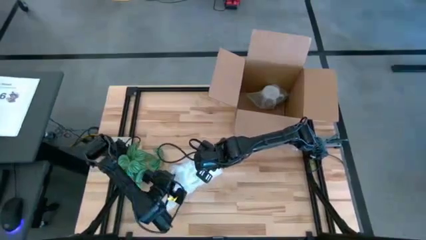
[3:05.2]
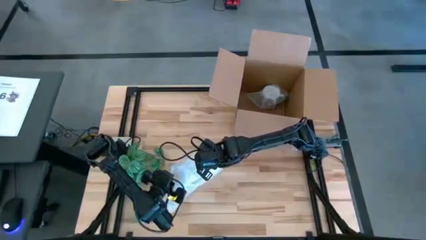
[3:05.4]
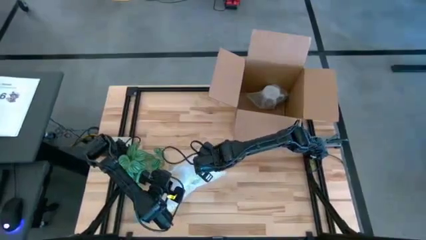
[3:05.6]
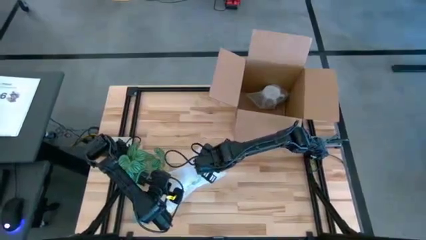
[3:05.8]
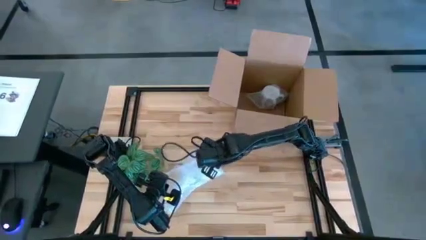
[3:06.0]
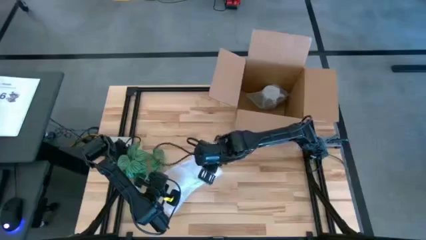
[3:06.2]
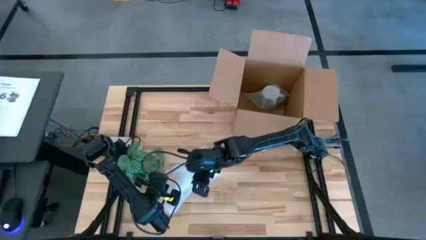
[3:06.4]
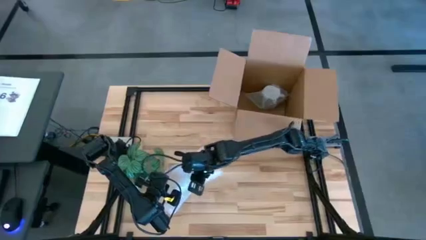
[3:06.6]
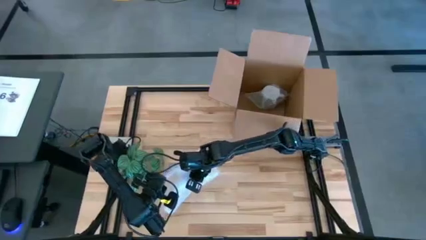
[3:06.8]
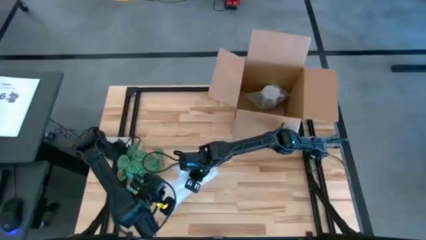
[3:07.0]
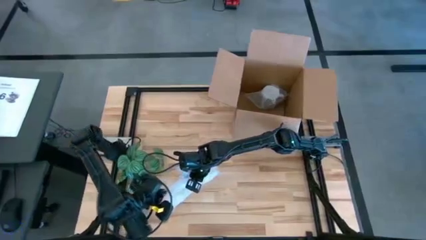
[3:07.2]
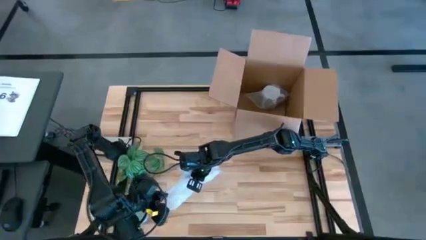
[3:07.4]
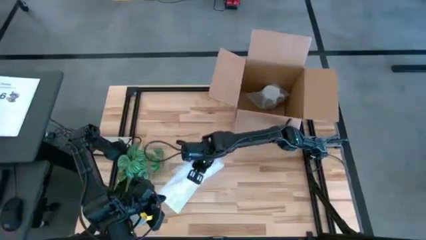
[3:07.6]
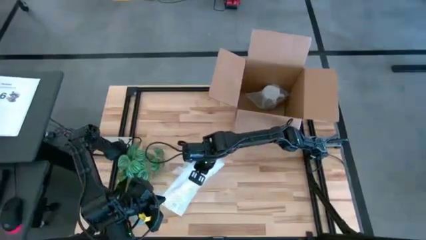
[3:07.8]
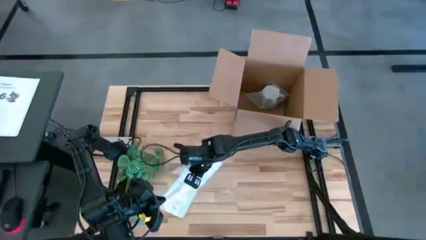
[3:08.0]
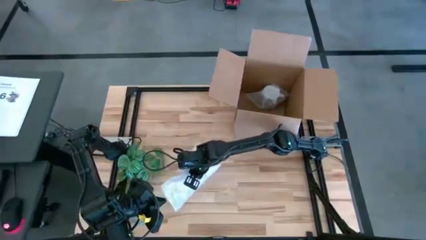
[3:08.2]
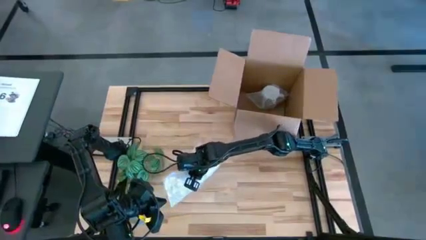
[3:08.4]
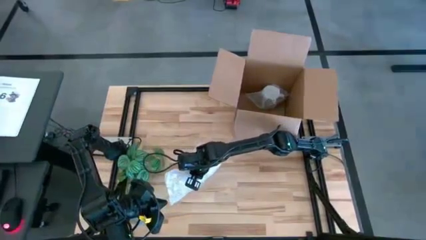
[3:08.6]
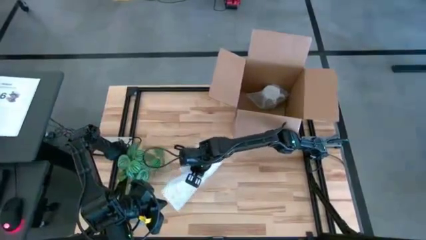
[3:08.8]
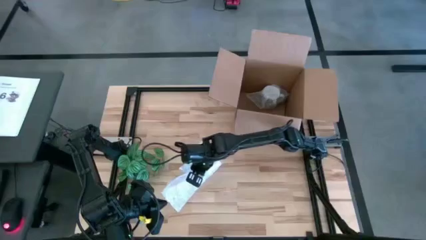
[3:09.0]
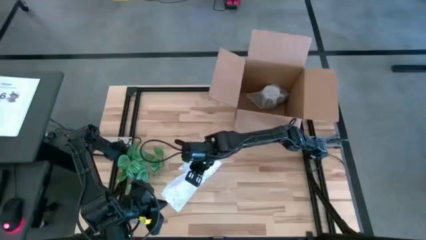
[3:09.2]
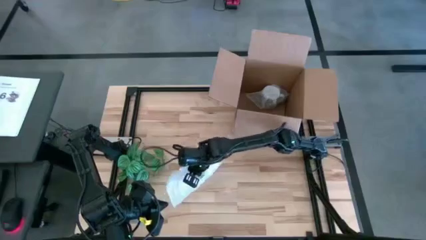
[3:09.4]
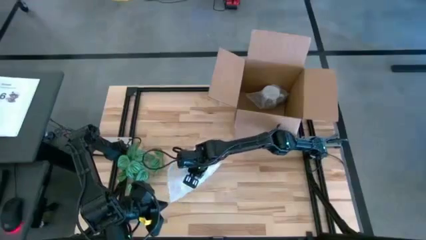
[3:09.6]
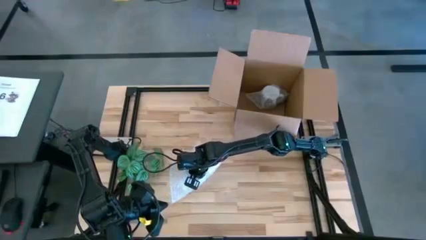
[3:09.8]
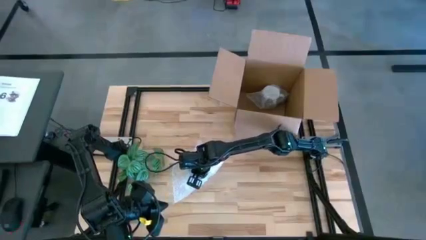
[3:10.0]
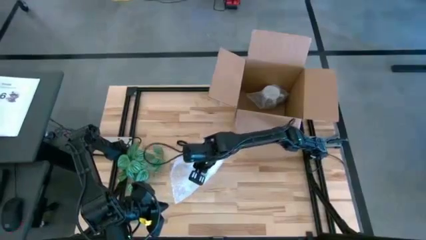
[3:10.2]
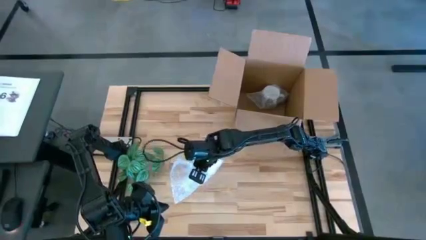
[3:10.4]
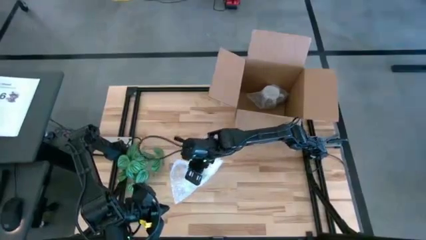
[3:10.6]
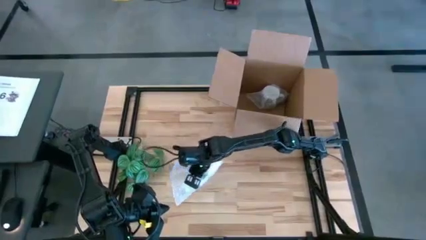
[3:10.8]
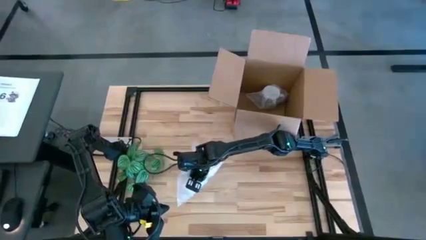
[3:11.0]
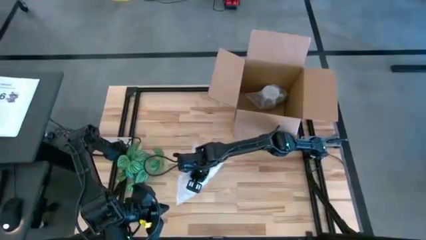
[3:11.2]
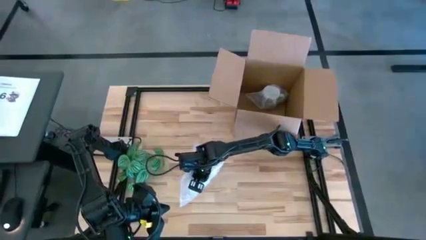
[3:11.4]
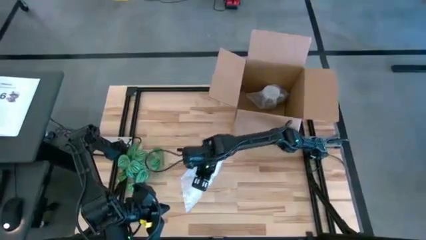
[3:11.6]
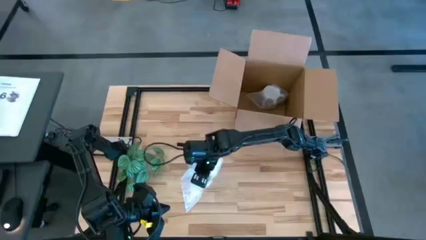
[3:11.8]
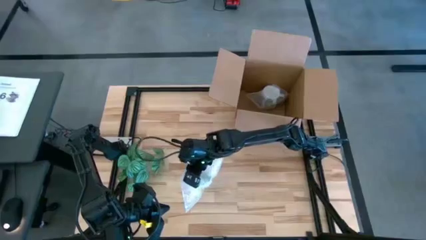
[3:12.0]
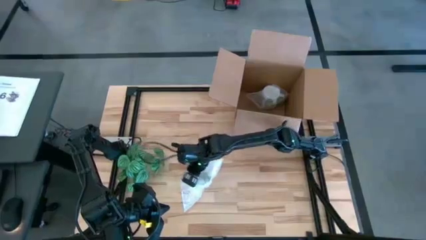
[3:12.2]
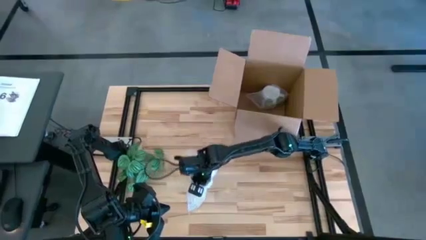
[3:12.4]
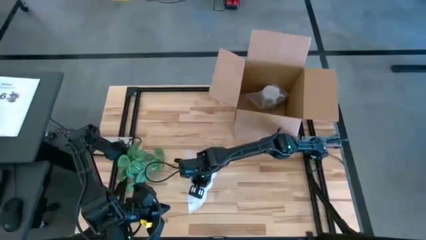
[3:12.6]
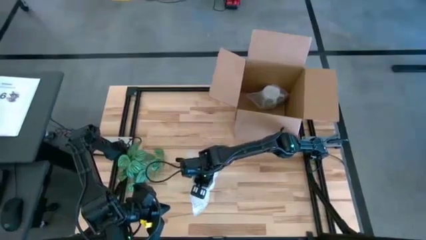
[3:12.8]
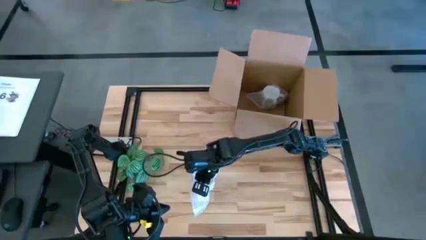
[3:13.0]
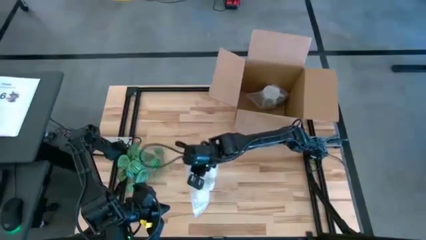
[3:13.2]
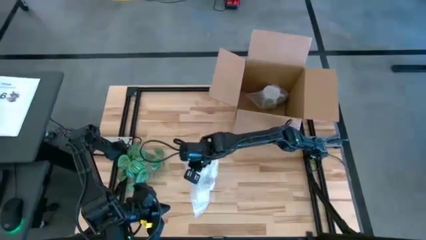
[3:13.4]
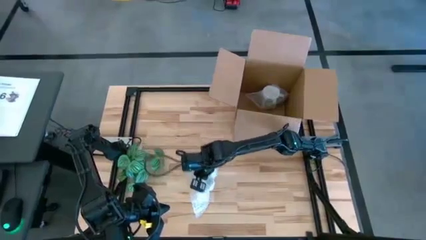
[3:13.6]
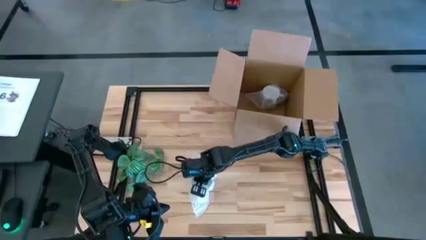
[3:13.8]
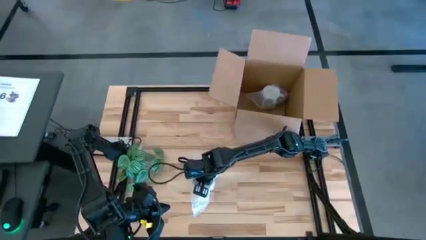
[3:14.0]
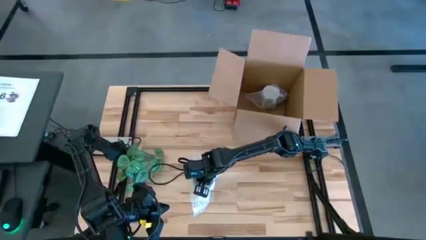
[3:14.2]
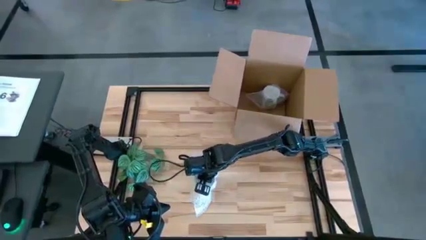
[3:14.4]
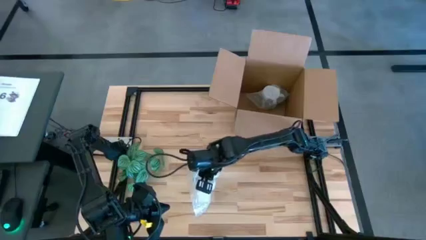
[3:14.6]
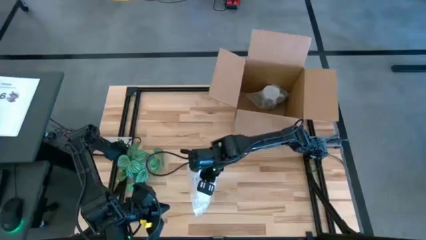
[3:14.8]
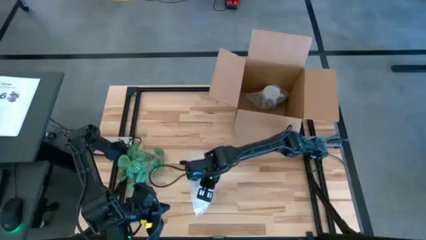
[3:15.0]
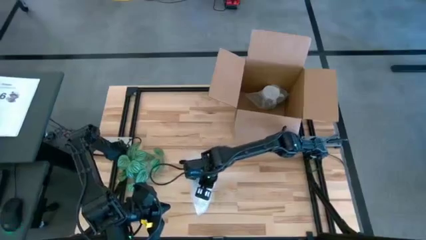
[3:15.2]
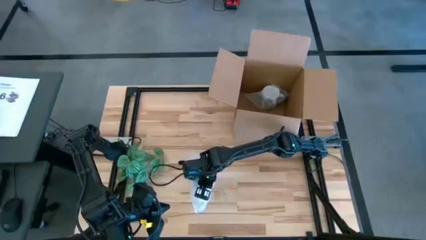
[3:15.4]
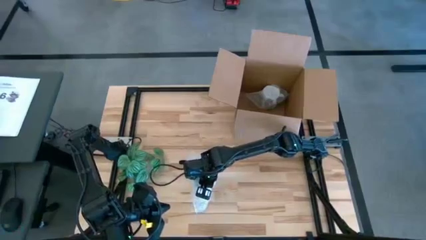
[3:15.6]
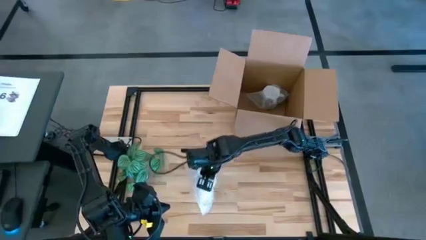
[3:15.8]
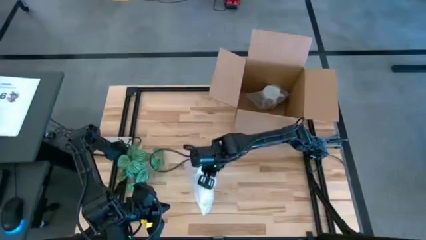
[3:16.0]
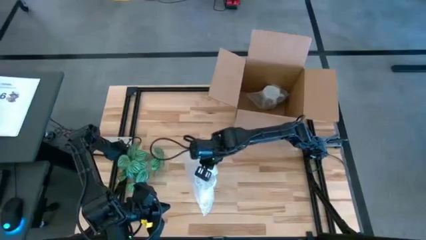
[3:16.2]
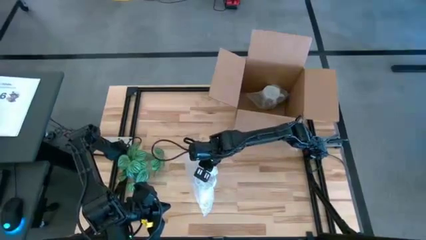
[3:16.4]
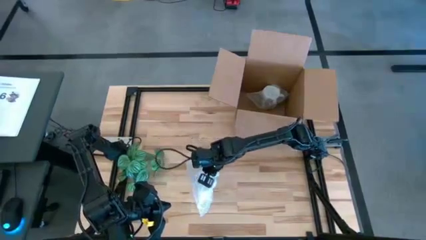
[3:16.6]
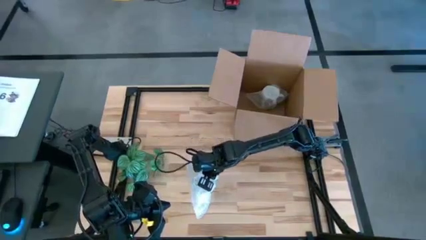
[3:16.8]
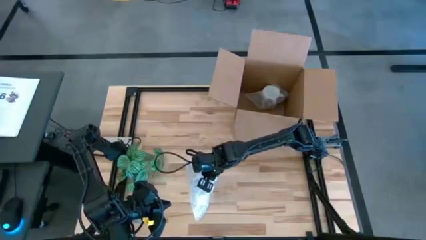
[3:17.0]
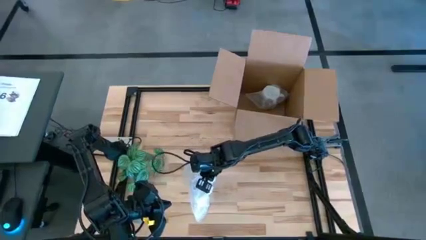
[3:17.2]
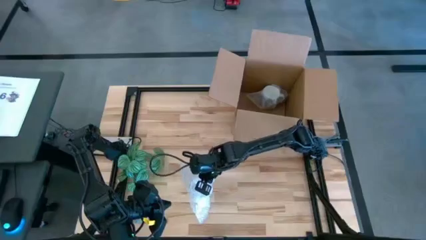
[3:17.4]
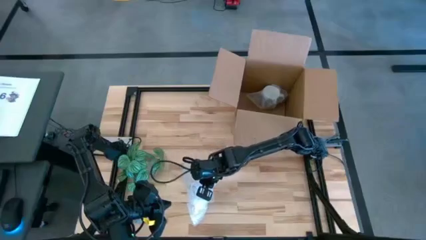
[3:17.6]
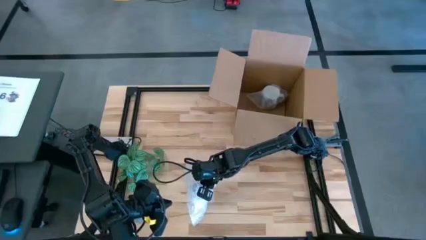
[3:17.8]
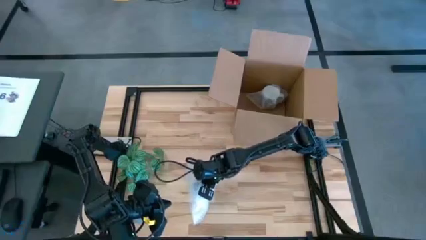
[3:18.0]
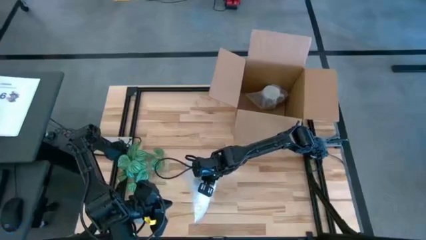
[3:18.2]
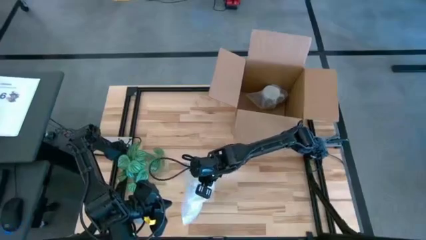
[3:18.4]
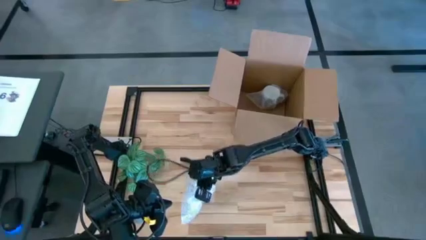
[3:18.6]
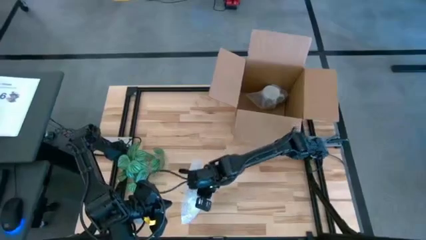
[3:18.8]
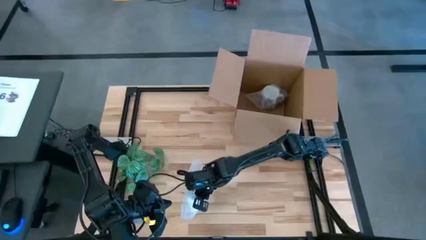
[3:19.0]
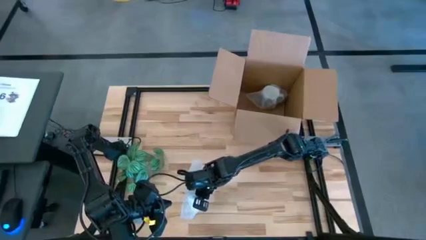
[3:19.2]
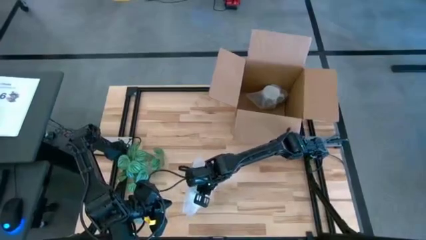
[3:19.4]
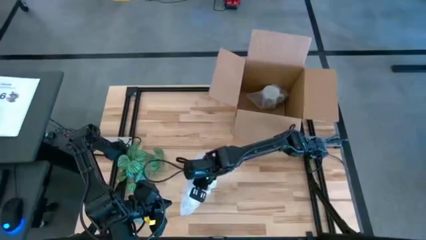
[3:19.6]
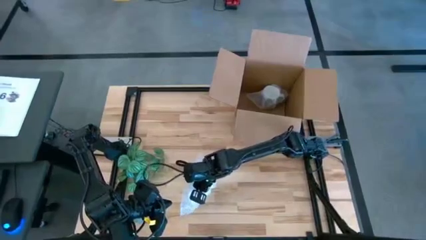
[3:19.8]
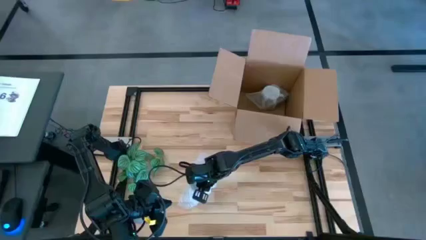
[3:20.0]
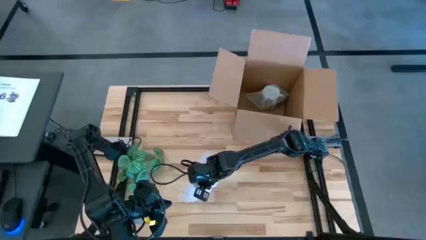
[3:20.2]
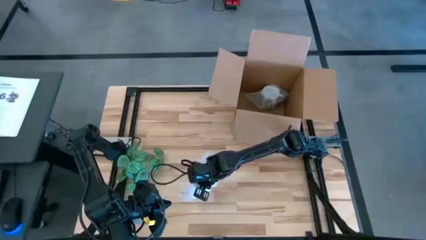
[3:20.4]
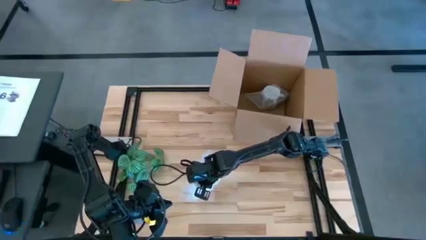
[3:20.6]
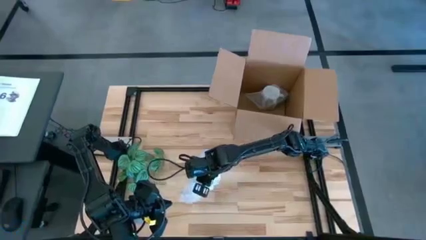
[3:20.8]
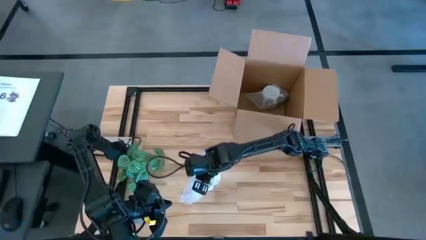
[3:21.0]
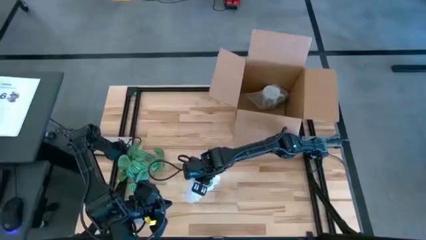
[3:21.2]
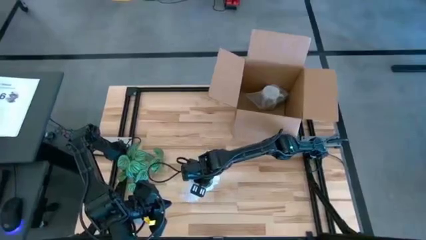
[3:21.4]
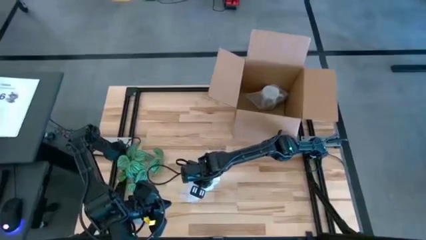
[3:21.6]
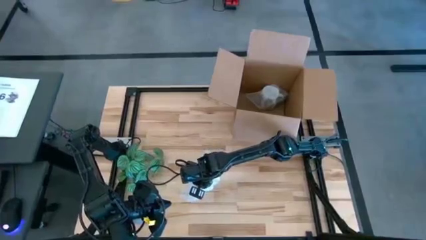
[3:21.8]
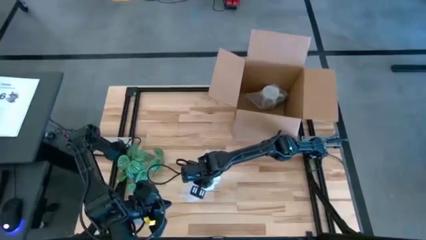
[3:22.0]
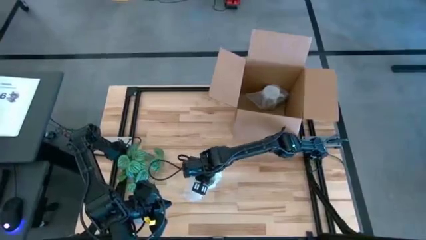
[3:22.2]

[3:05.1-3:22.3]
Task: wrap mug
Wrap the blue mug with bubble wrap
